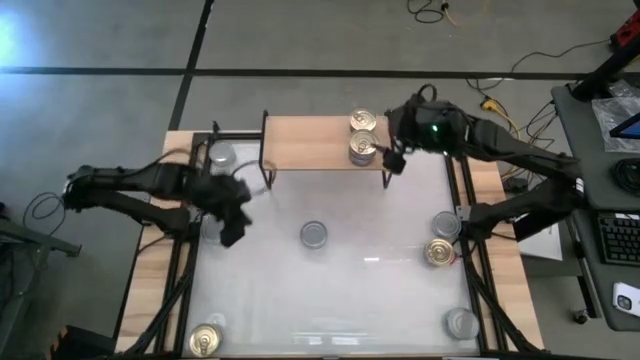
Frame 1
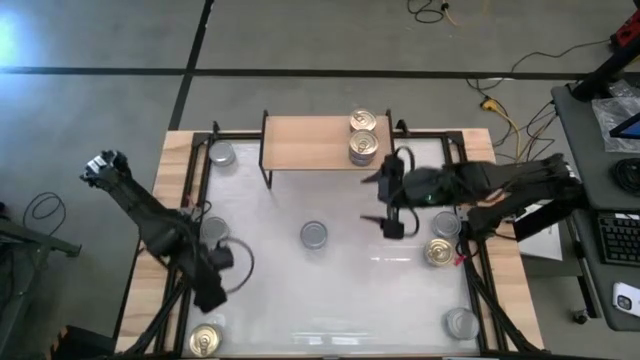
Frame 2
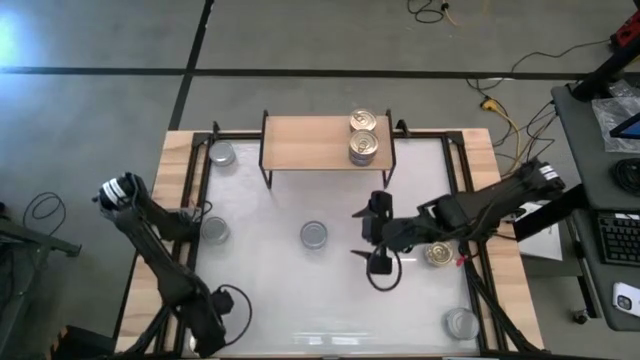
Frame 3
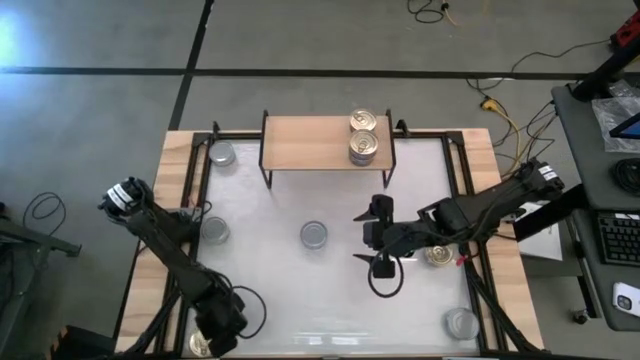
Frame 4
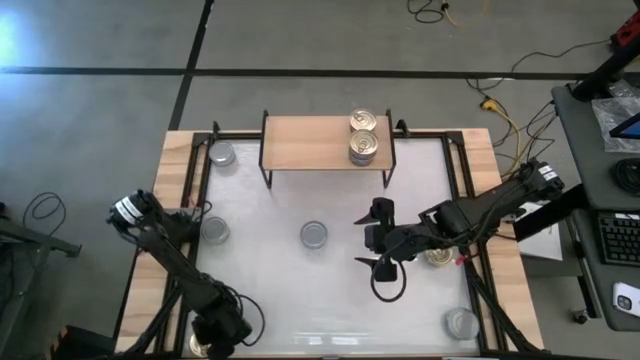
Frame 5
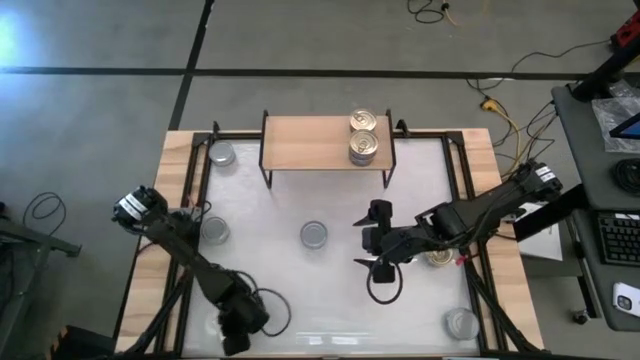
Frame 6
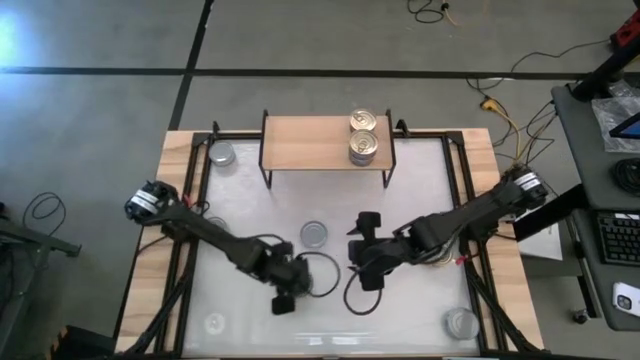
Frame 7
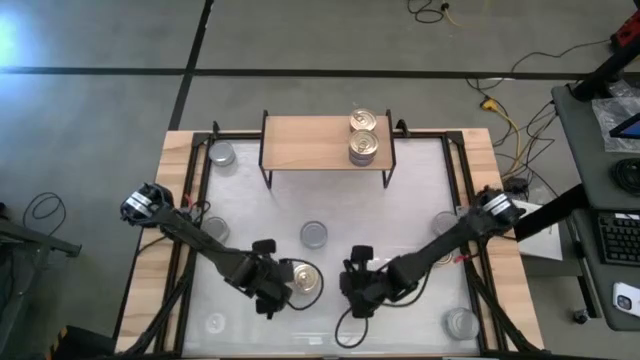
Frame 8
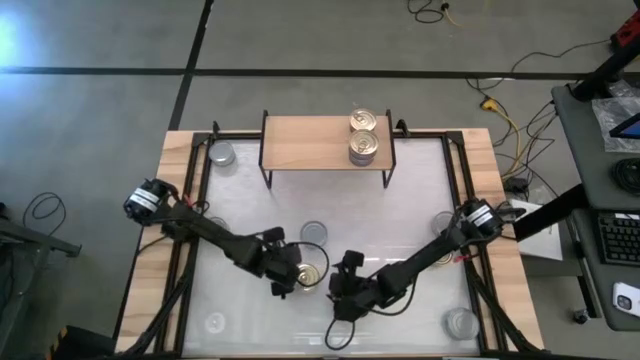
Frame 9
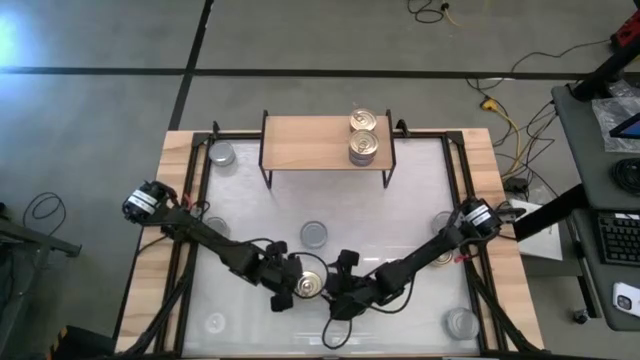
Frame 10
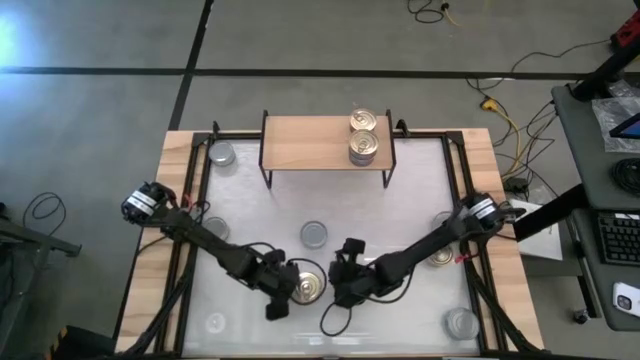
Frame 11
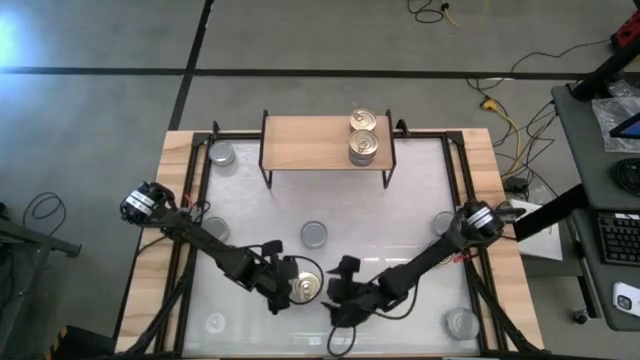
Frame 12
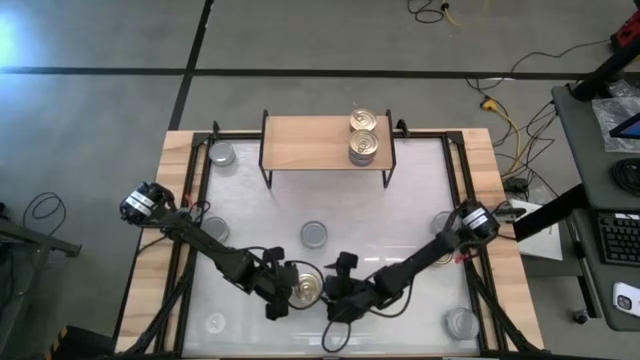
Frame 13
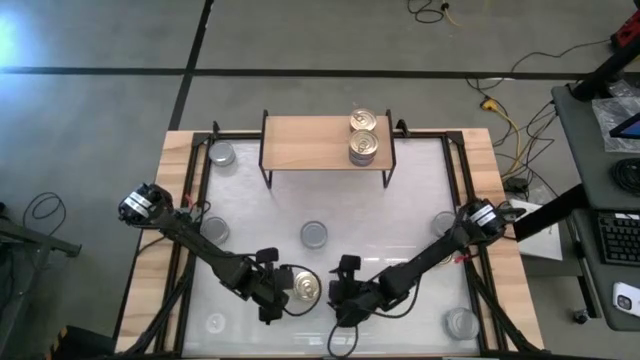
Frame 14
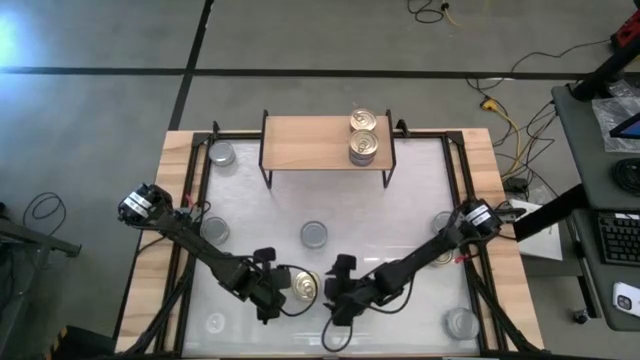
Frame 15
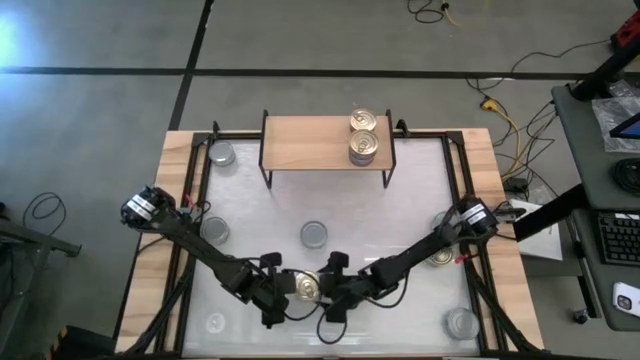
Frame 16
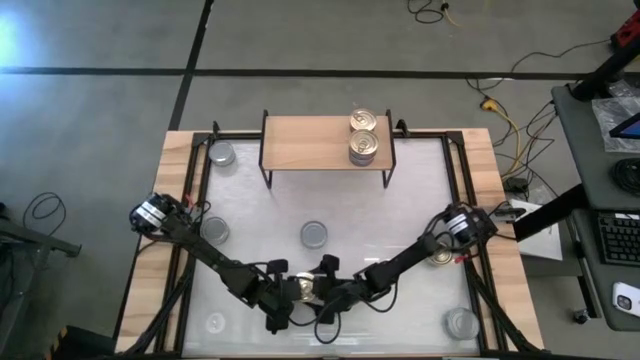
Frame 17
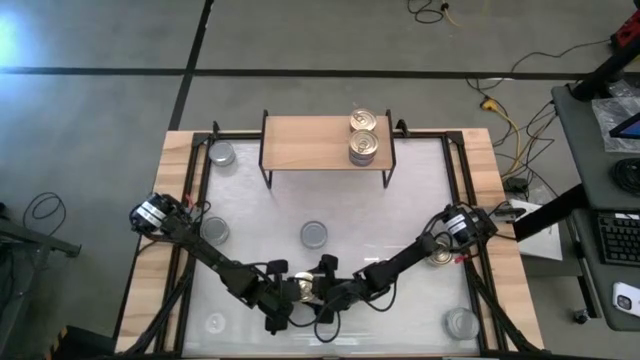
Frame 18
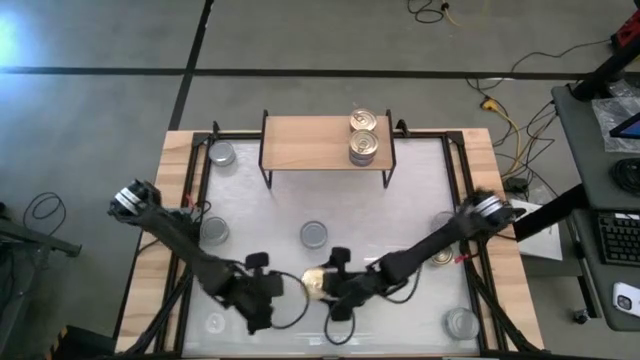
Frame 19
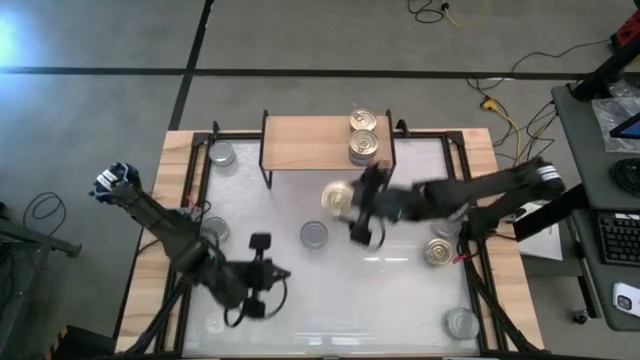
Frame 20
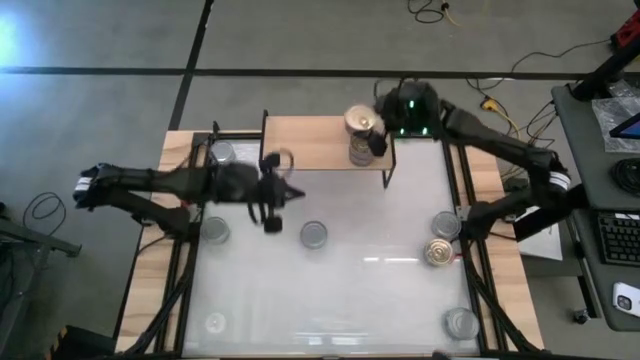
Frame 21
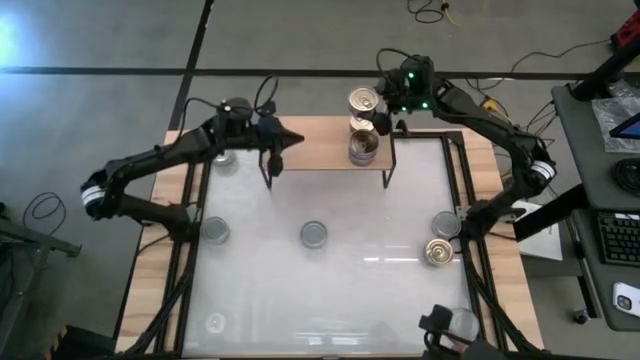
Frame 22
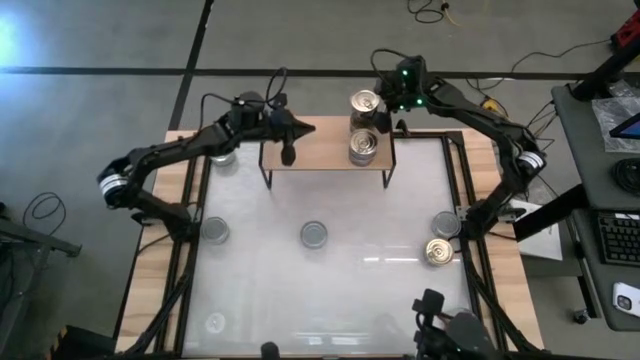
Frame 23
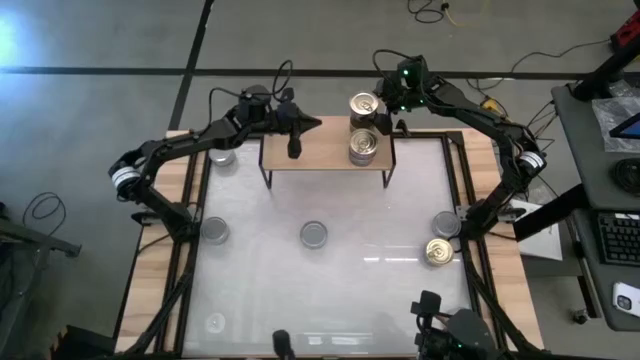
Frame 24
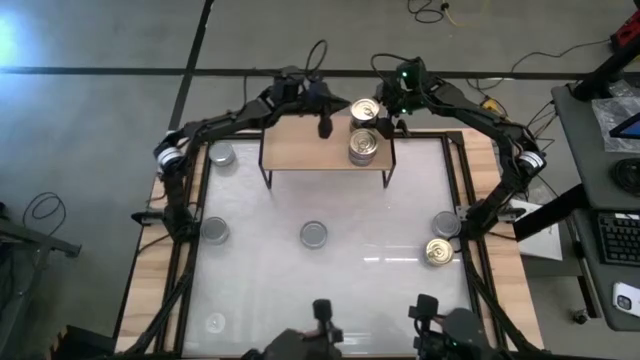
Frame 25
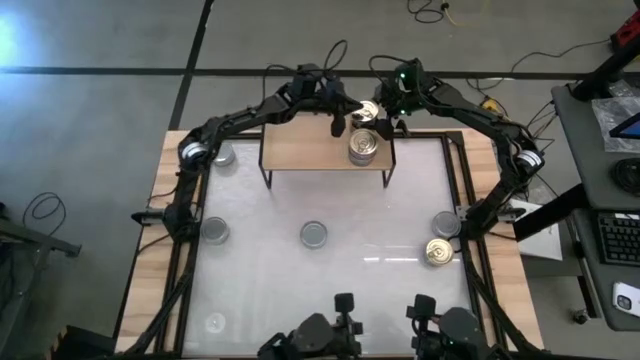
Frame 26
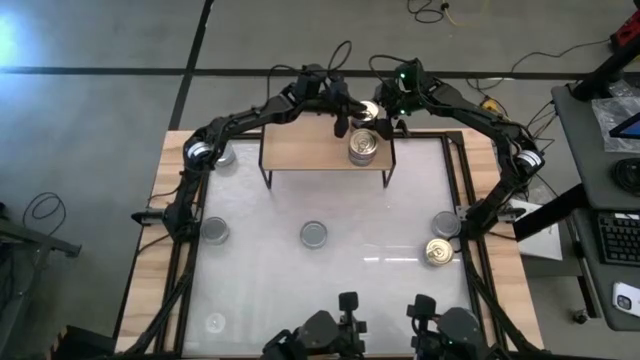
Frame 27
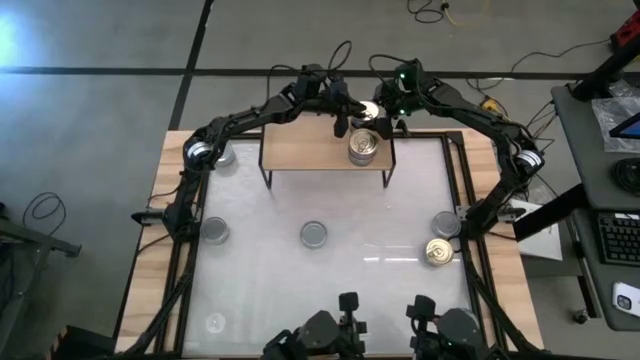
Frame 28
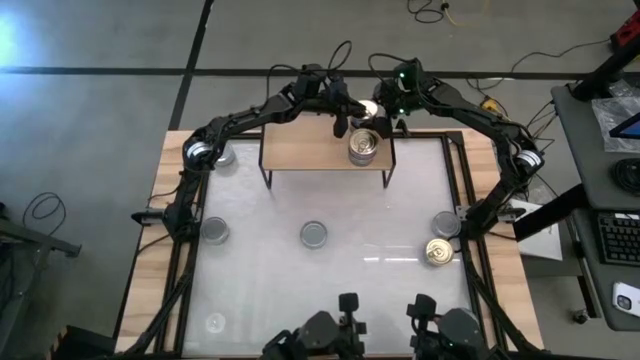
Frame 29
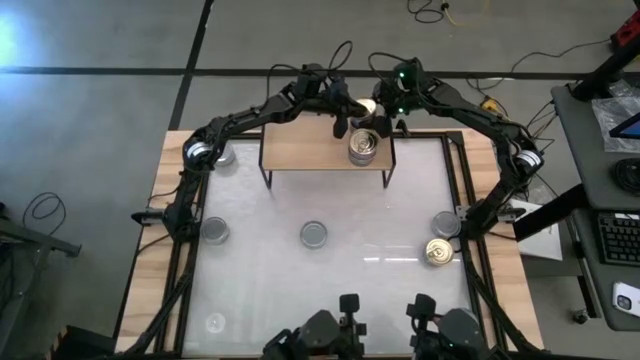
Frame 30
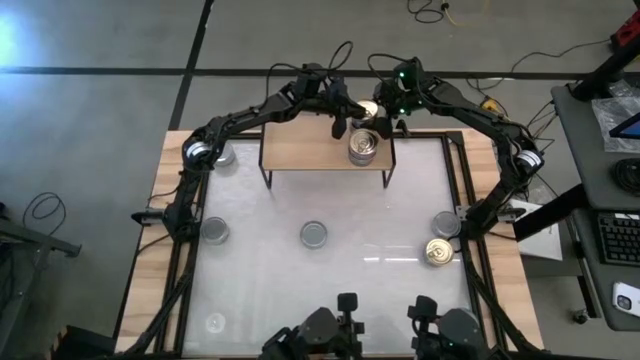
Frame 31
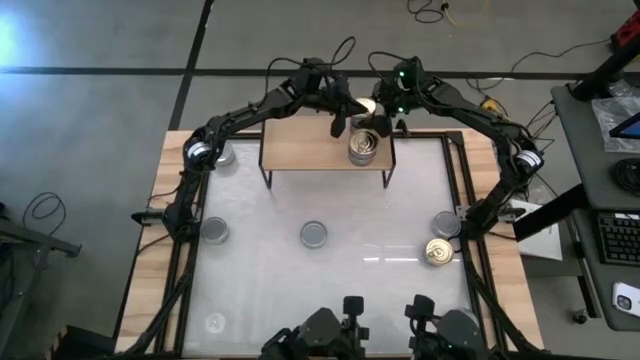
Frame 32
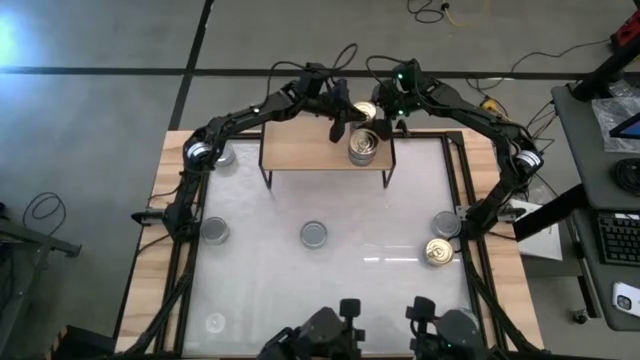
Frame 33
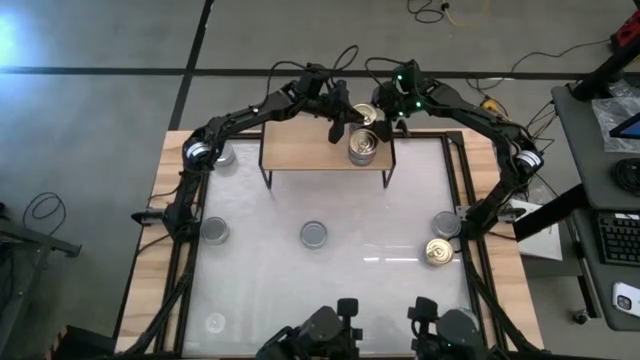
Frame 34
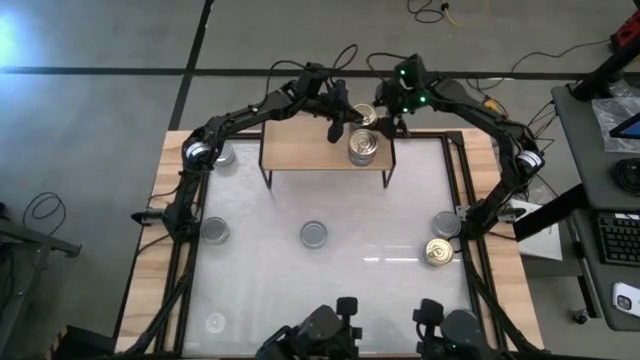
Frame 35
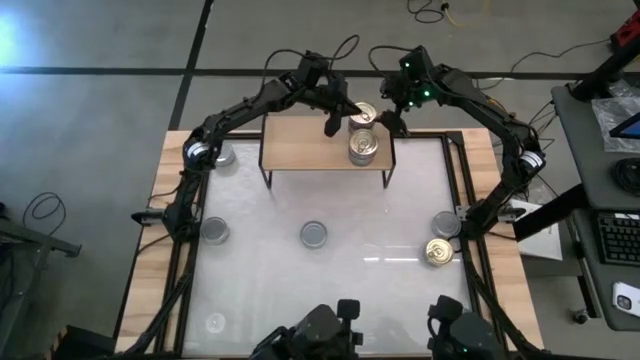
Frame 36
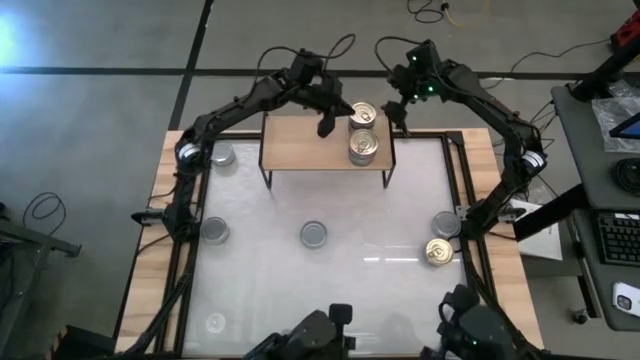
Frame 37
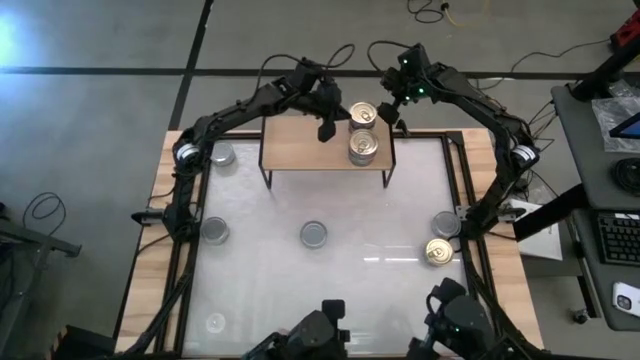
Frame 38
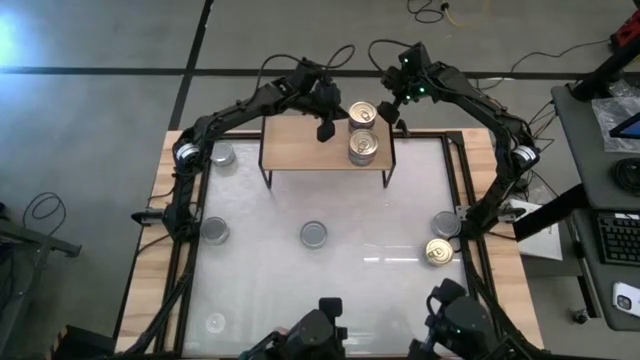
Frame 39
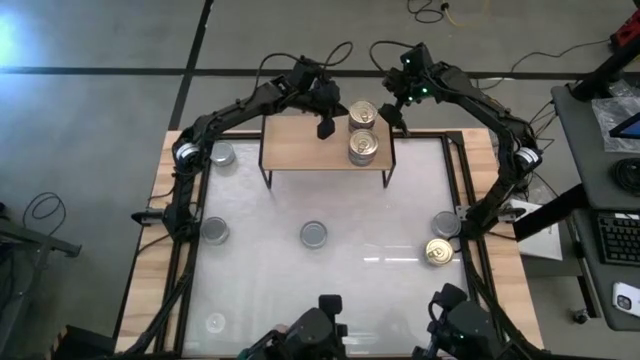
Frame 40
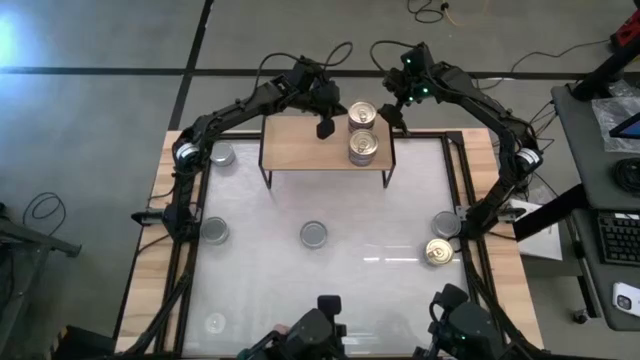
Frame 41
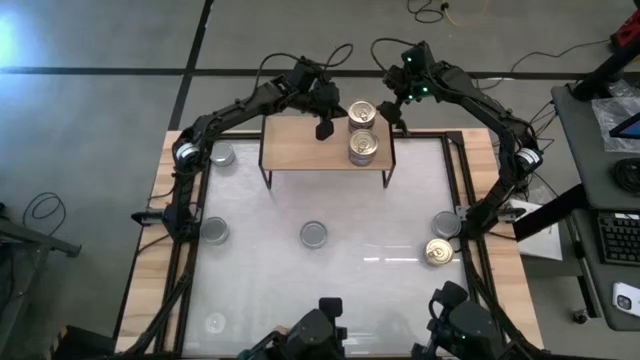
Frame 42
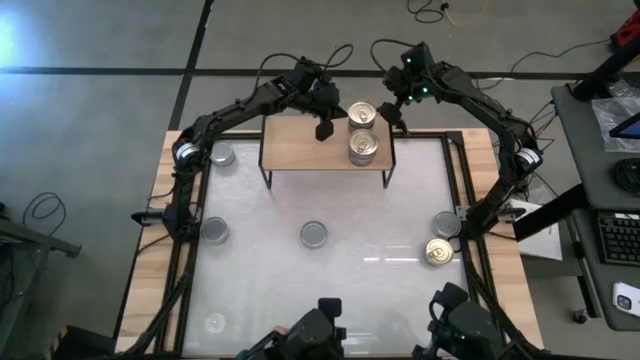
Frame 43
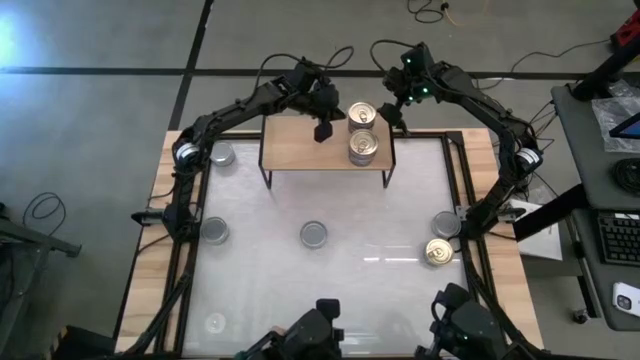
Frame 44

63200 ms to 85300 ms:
Task: Stack canned seafood by type on shelf
Stack the blue tuna can on top of the blue tuna can on the shelf
